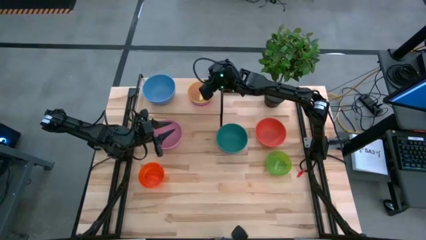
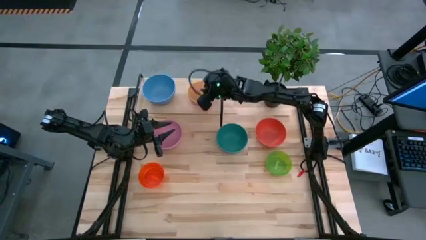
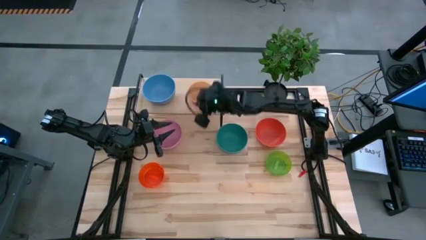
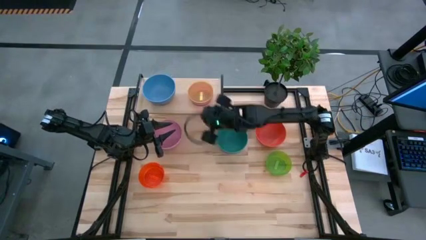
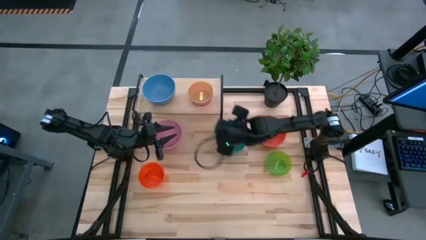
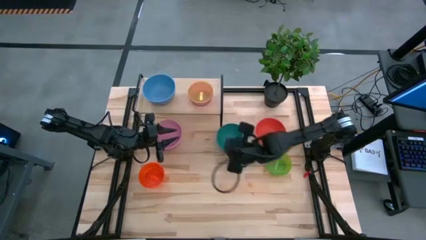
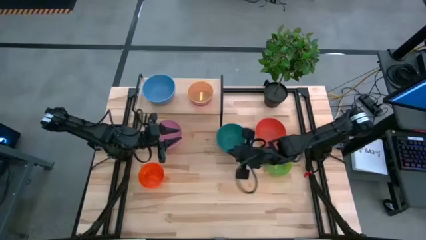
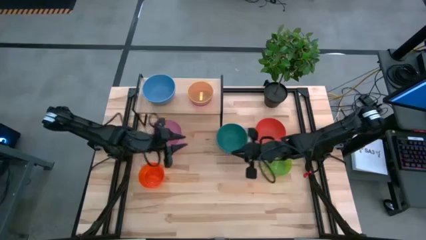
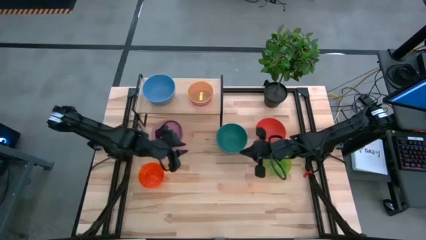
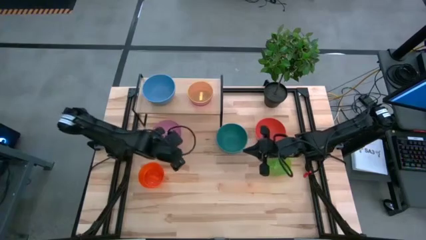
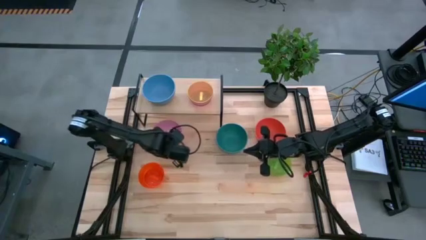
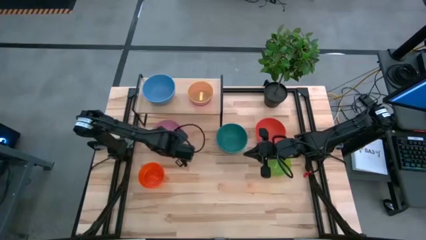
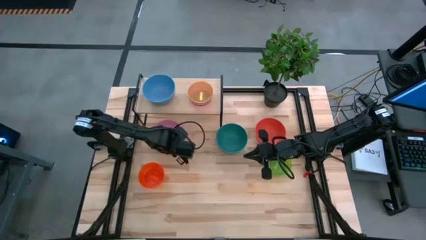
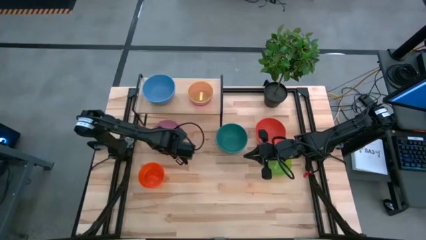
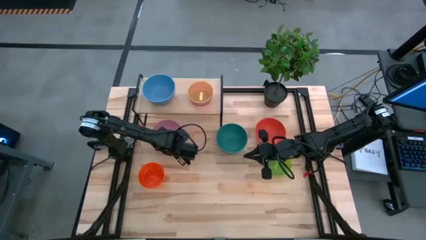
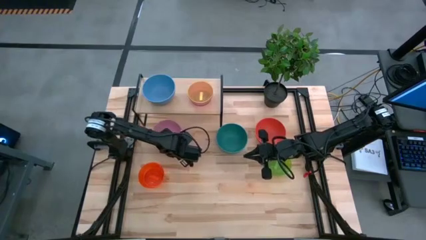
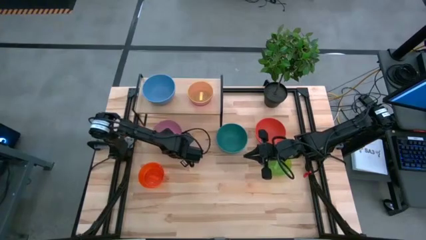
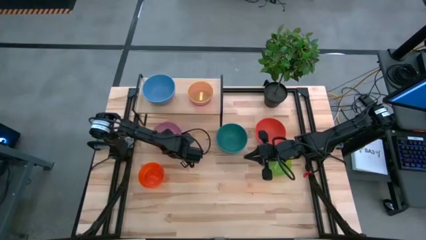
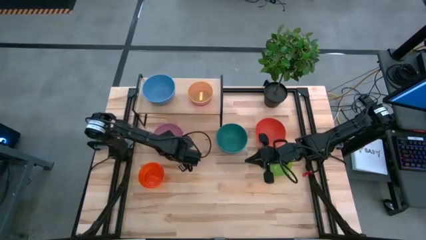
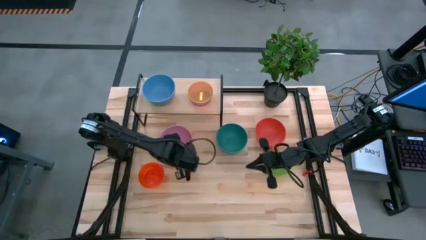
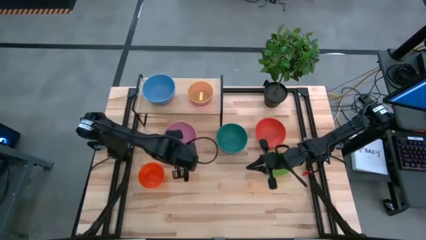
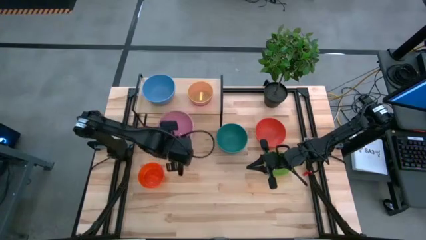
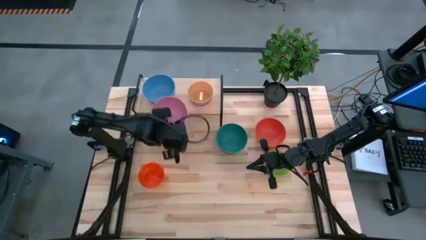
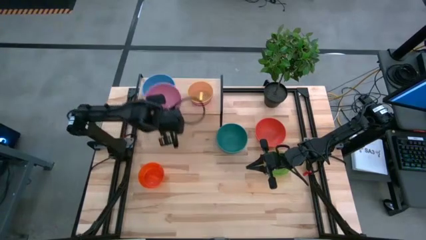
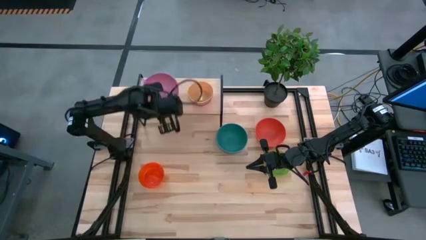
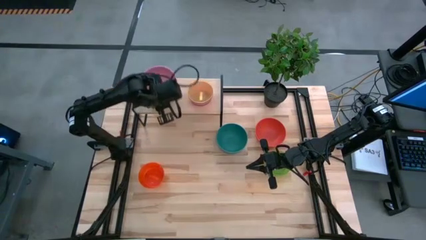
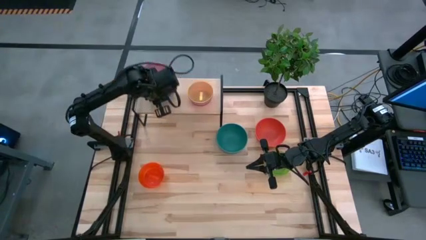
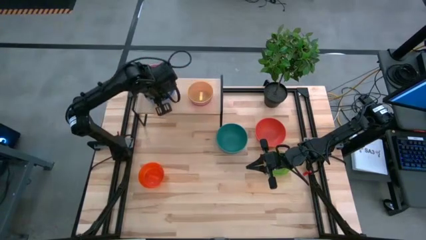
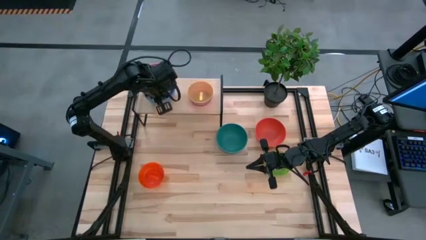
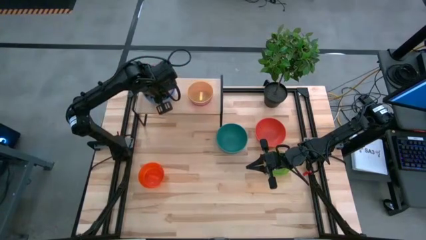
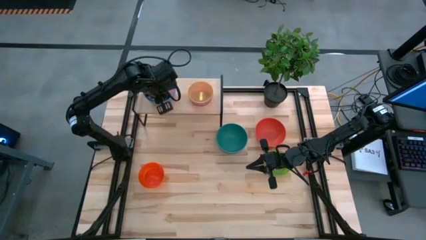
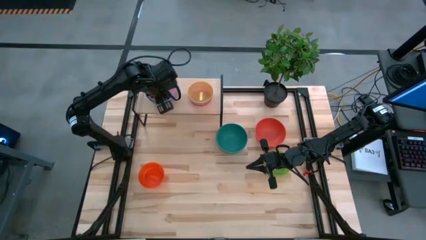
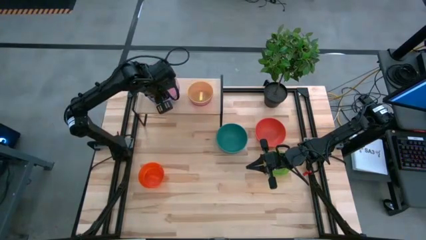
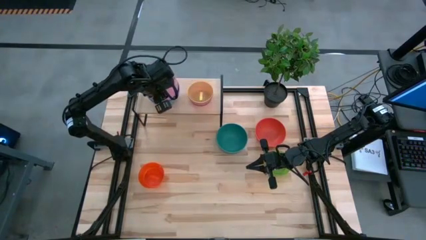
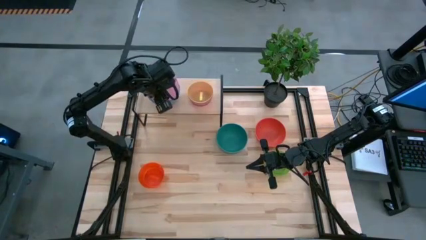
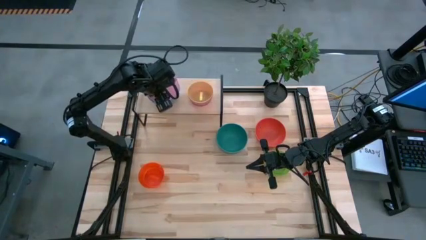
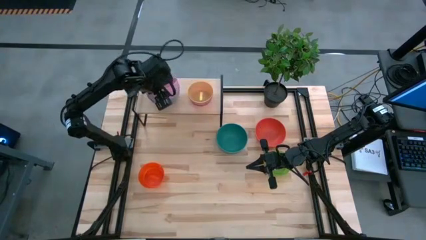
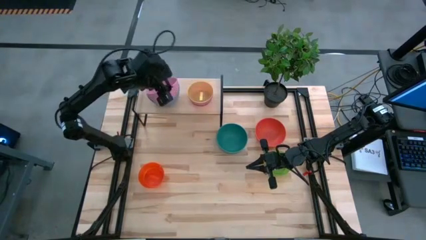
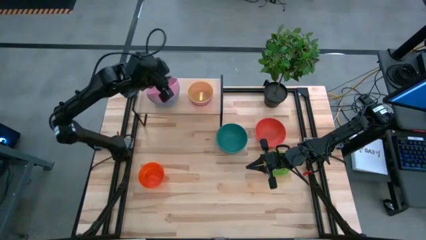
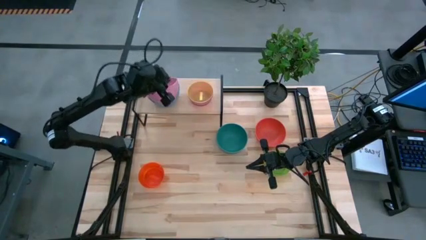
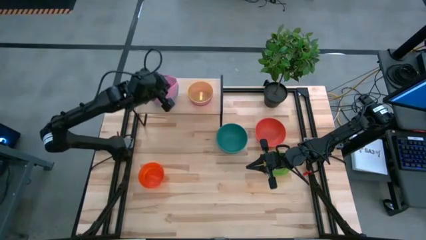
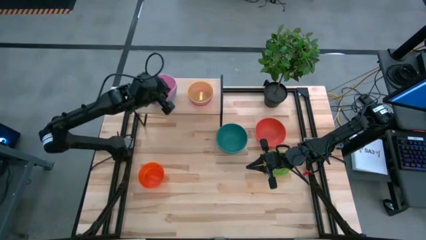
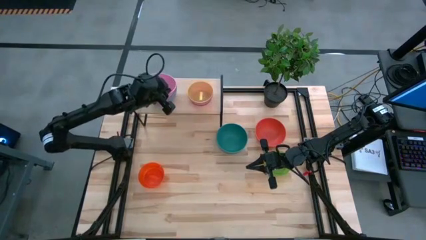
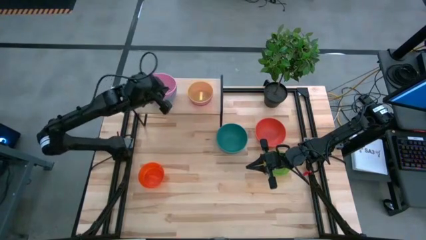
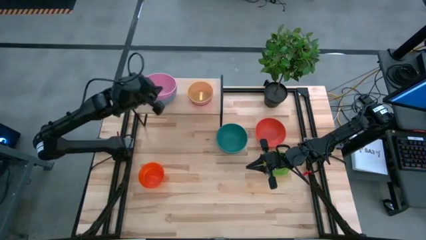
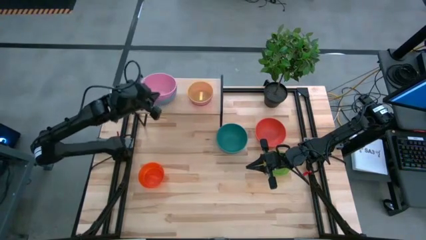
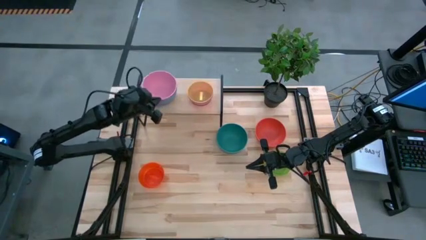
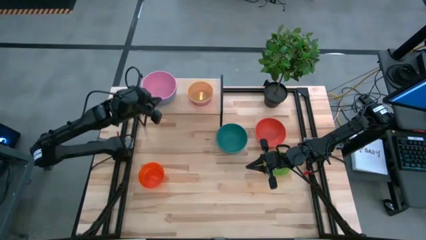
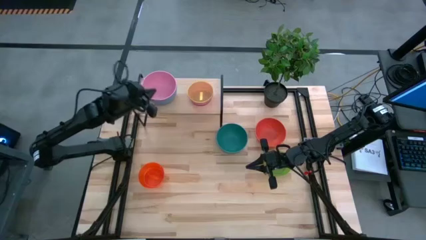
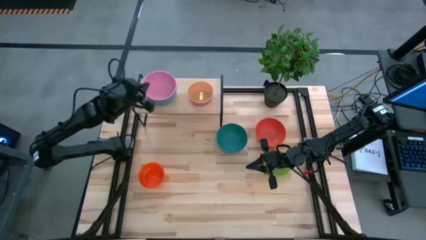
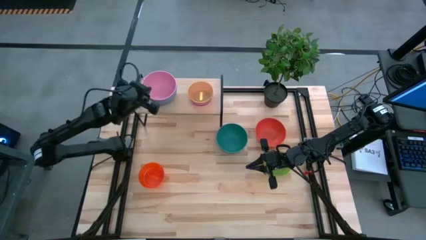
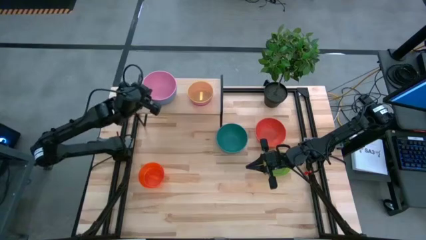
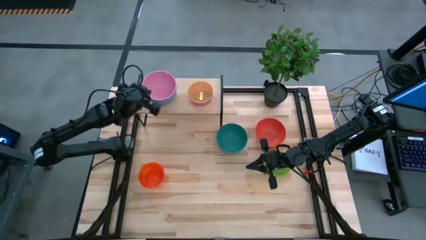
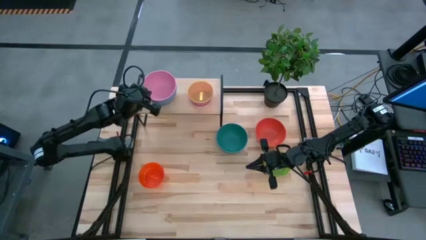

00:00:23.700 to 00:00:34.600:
Task: Place and stack bowls onto a shelf
Stack the pink bowl on the blue bowl on the shelf

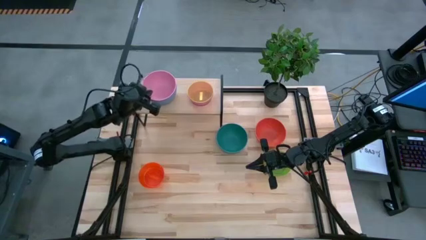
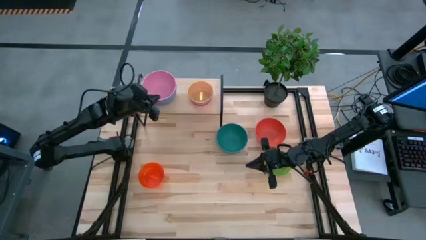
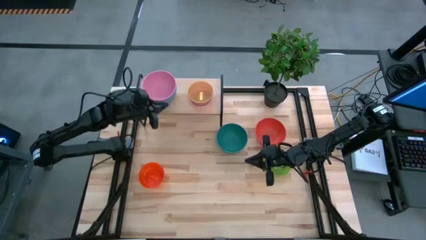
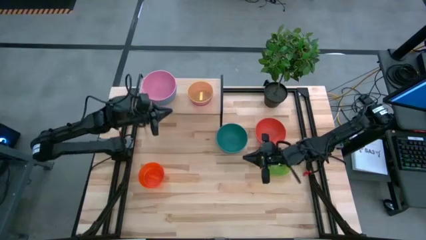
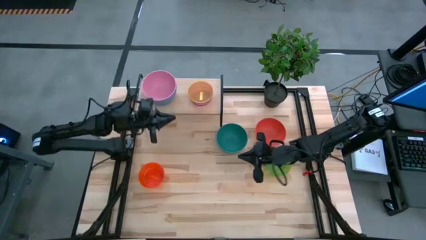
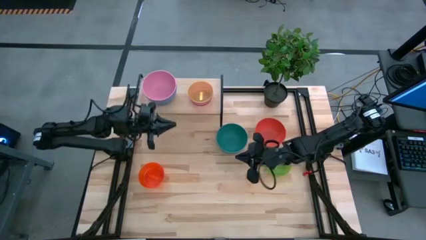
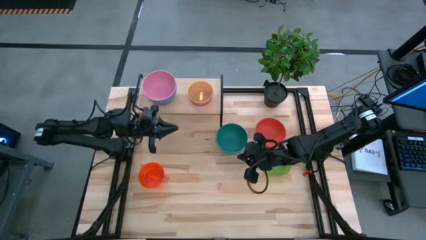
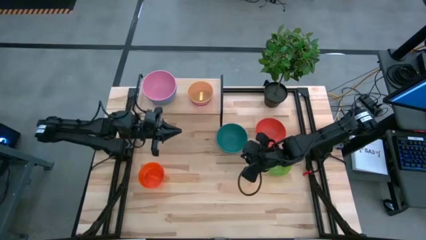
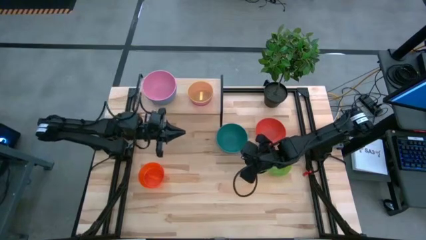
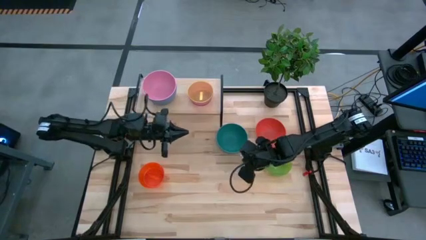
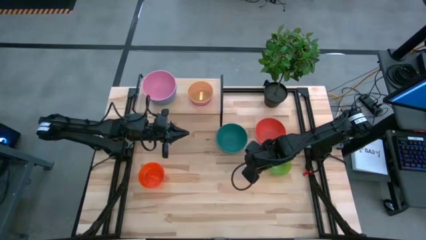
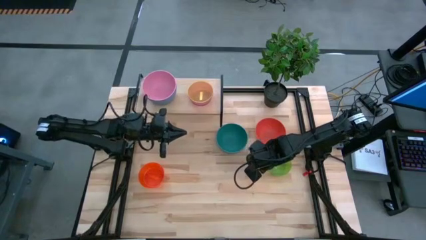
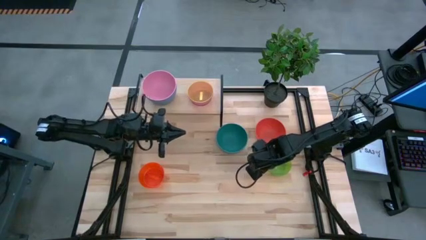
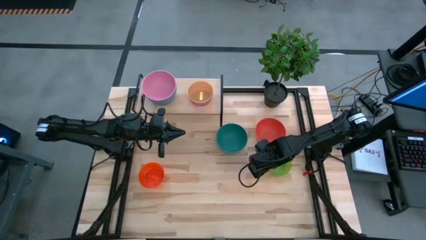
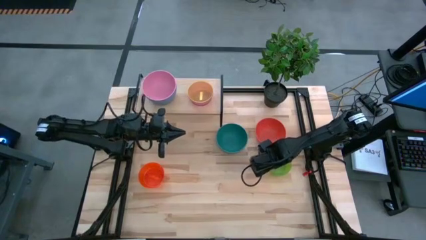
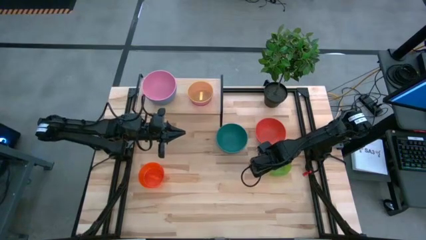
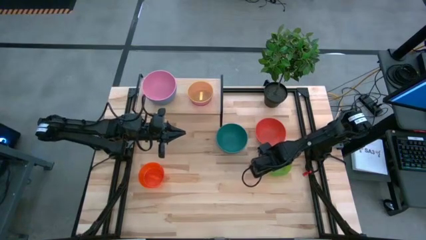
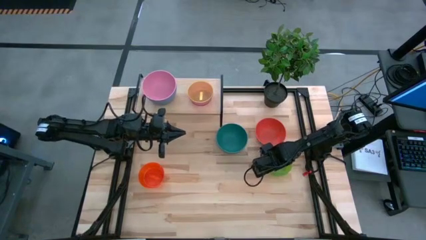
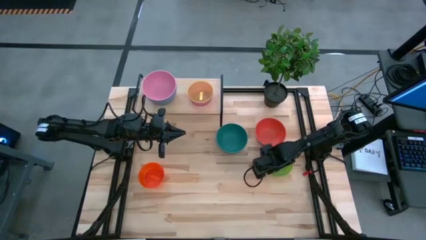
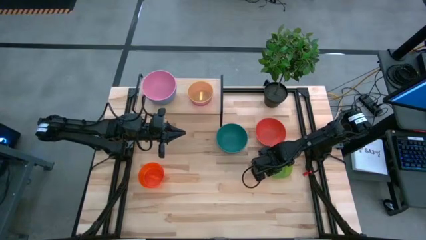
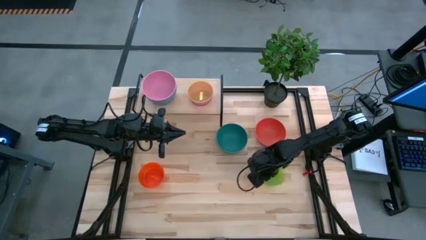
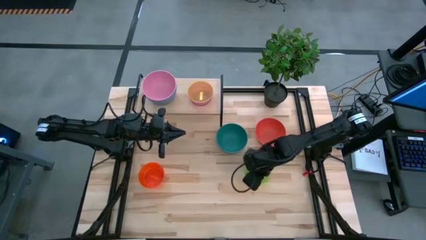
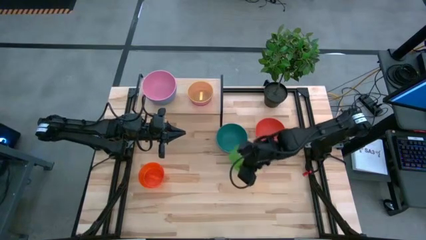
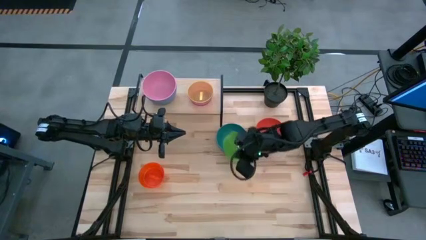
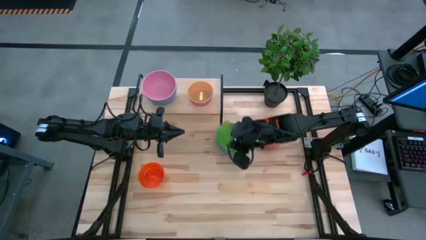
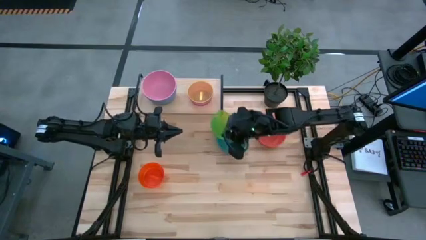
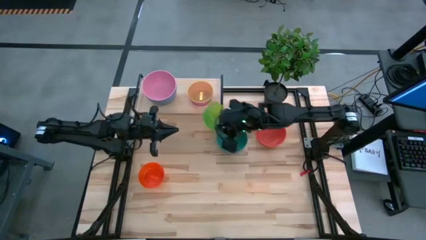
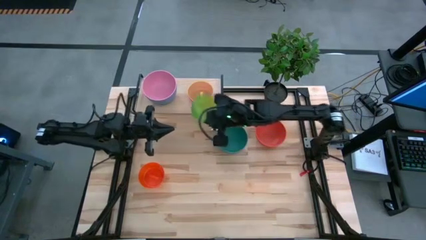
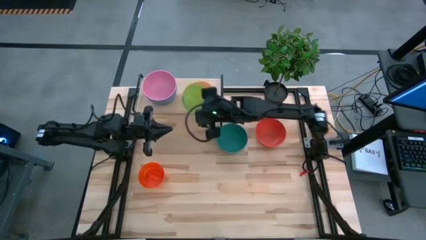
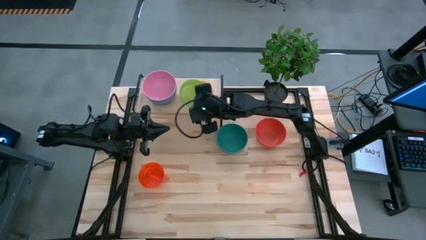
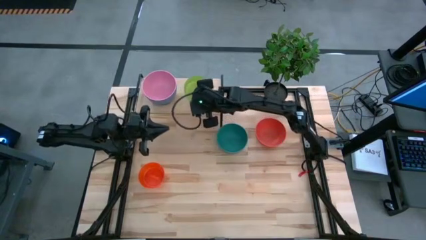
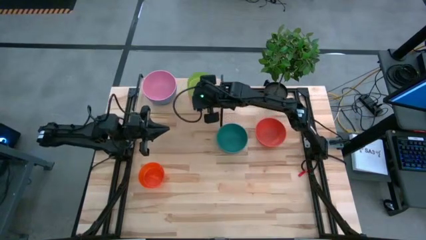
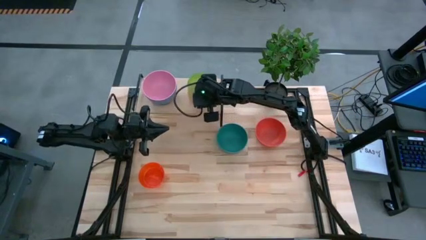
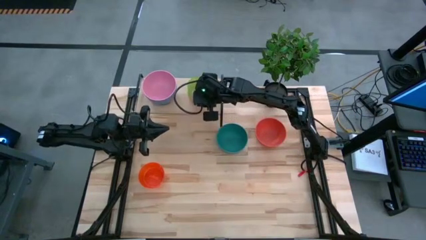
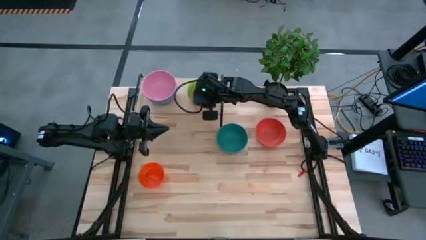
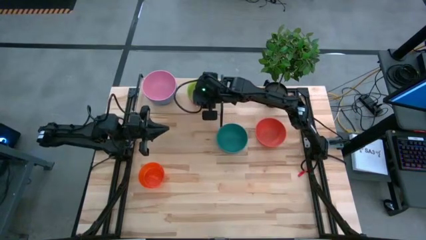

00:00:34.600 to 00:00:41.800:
Stack the green bowl on the yellow bowl on the shelf
